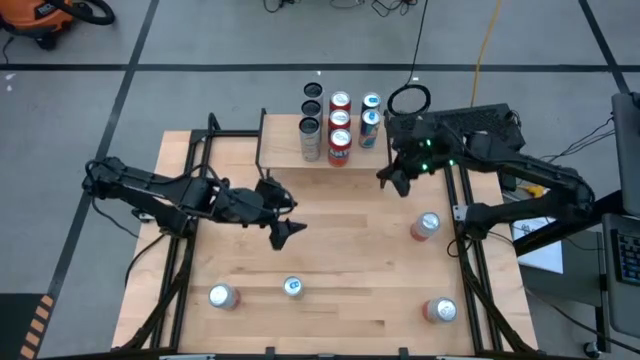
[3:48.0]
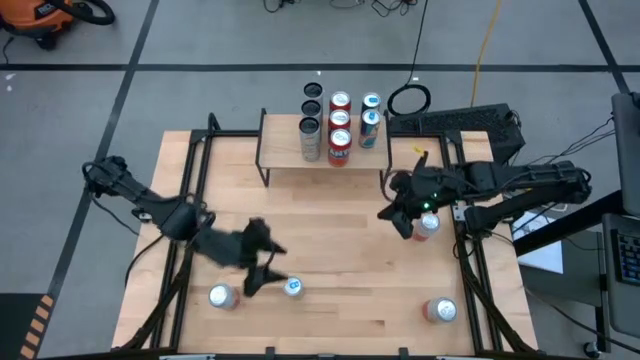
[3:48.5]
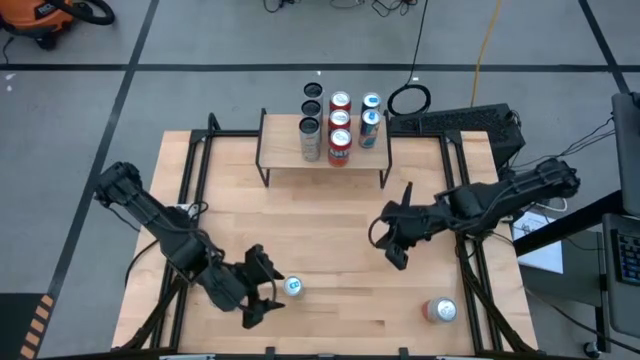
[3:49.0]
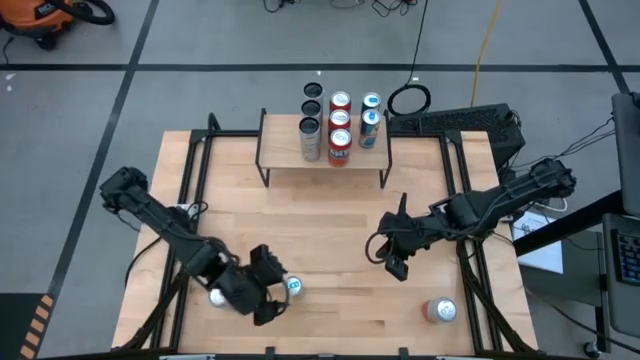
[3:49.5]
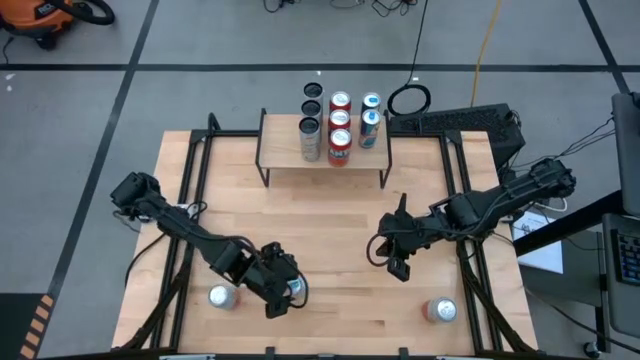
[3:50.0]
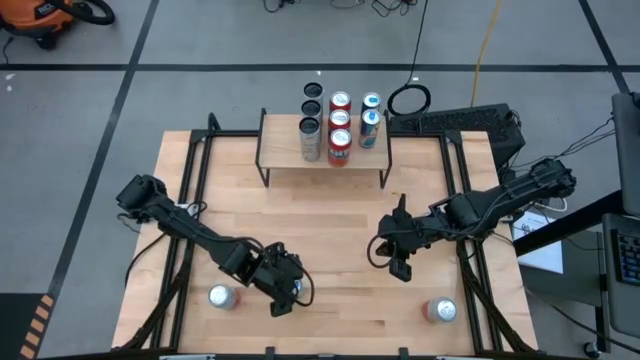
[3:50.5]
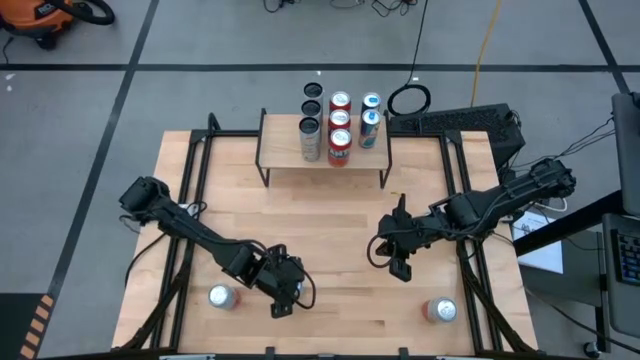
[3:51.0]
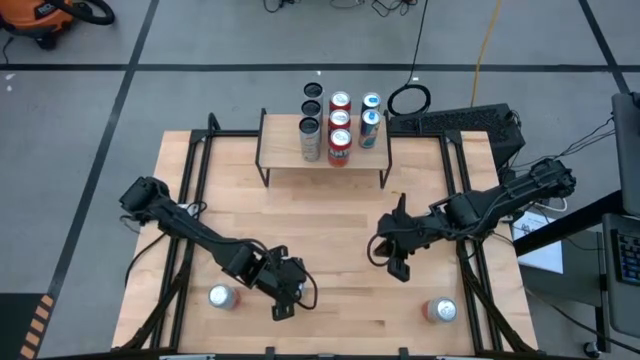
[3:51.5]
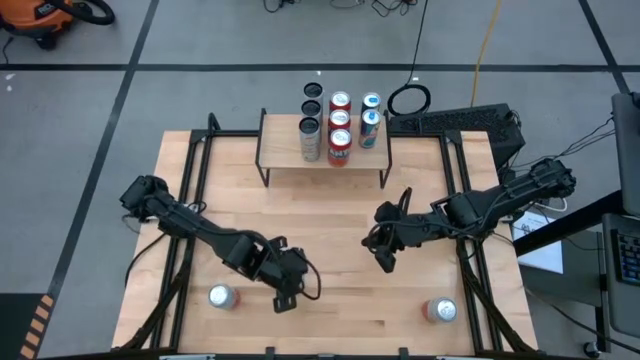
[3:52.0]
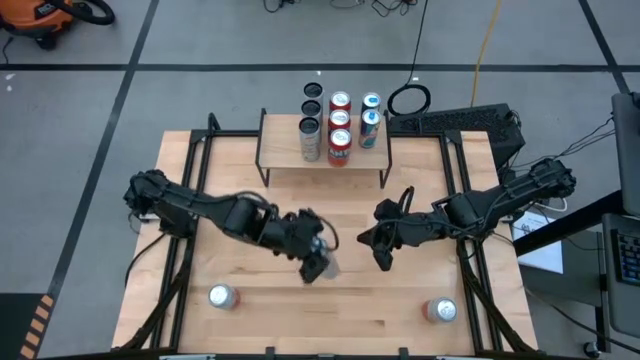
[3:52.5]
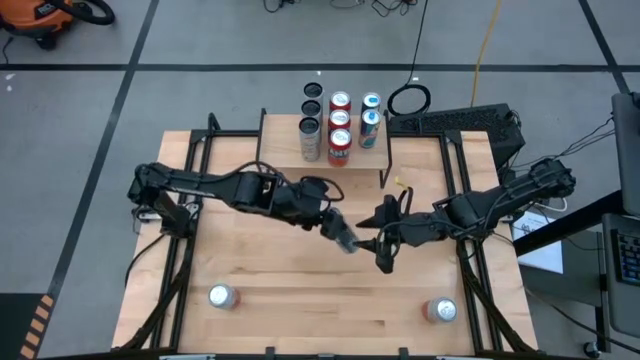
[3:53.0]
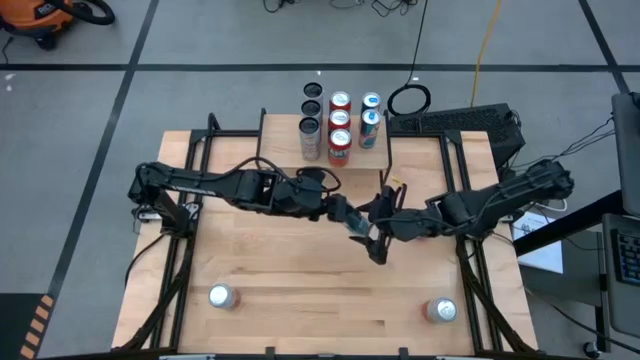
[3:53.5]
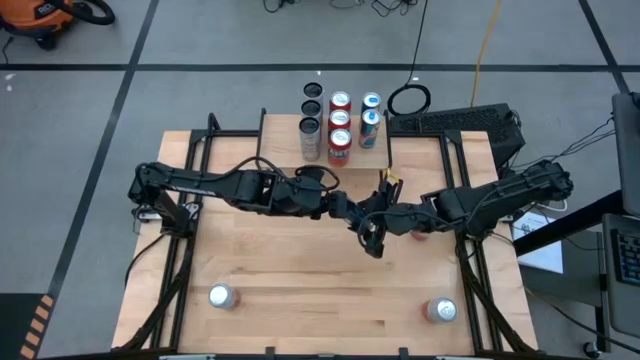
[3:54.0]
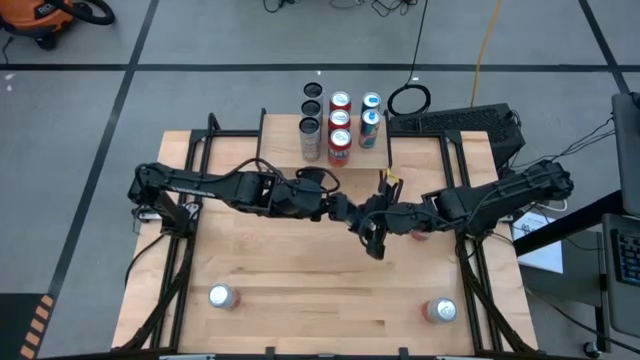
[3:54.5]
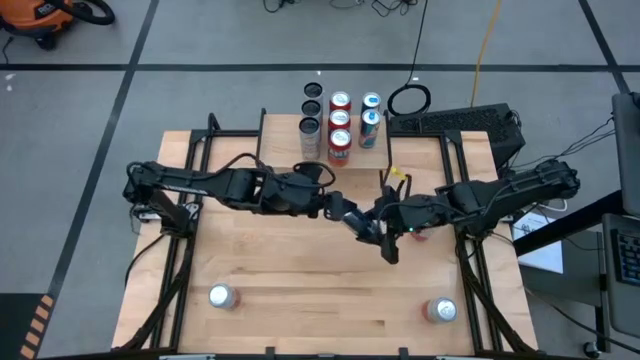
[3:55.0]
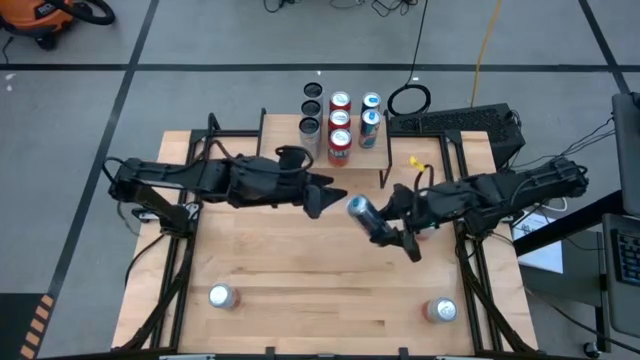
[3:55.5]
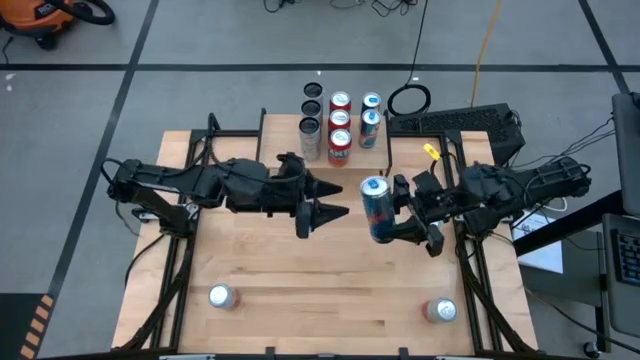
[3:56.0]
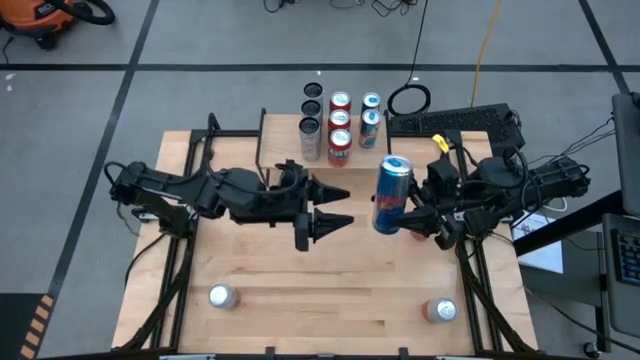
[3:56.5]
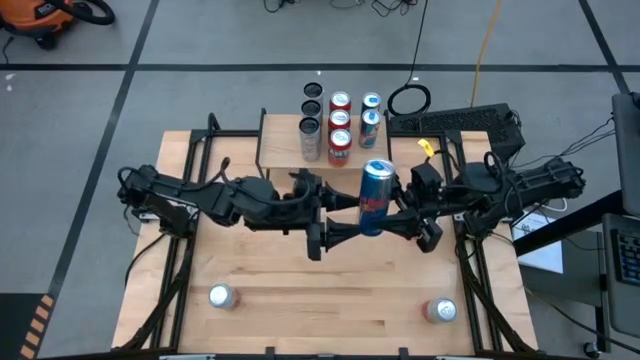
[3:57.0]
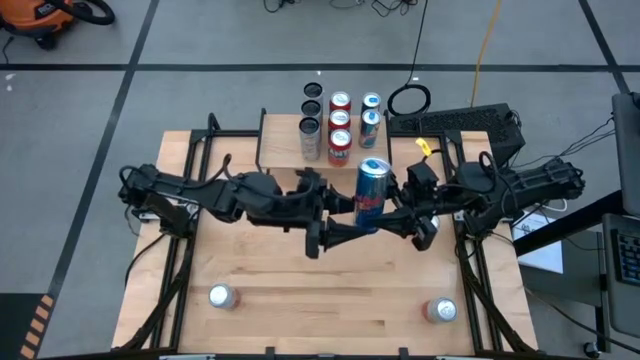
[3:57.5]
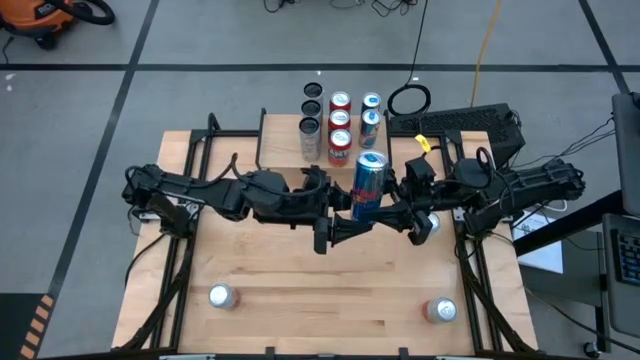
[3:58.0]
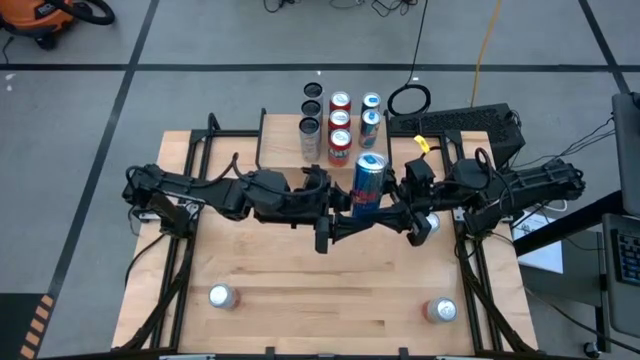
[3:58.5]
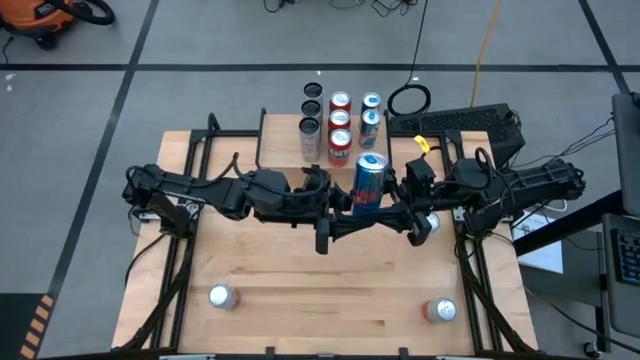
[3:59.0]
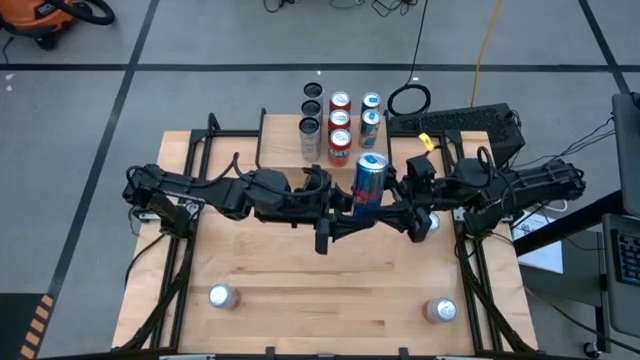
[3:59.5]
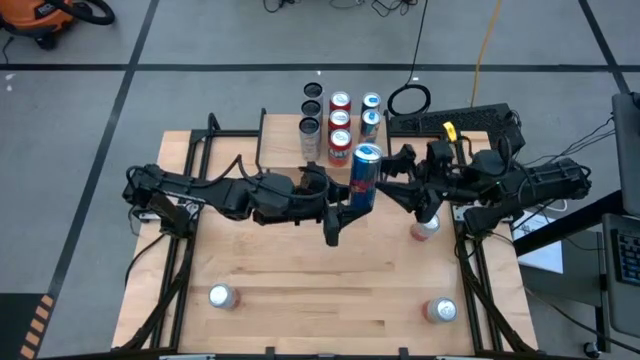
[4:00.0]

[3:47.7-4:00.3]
Task: Place canned beverage on shelf
Put the blue soda can aligned with the other blue soda can on the shelf
